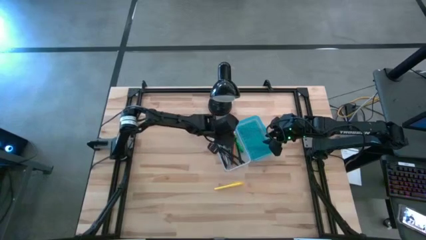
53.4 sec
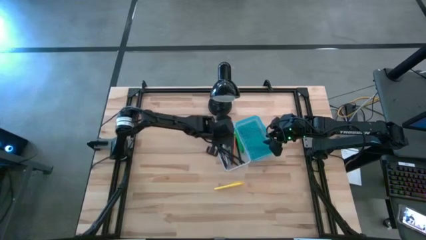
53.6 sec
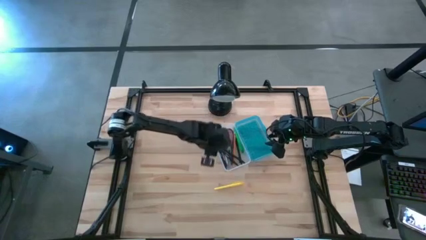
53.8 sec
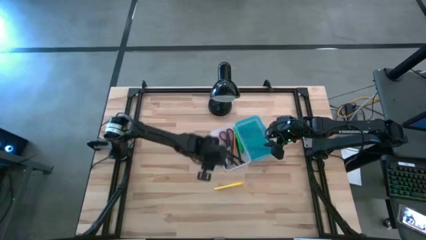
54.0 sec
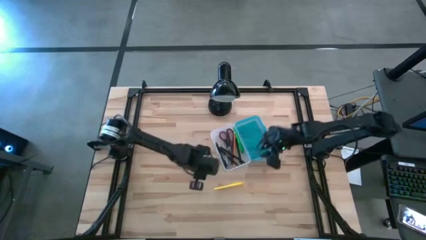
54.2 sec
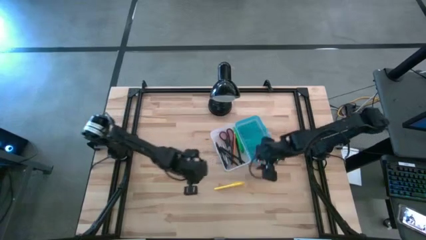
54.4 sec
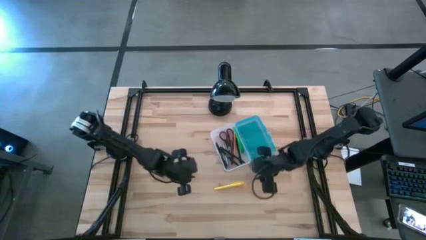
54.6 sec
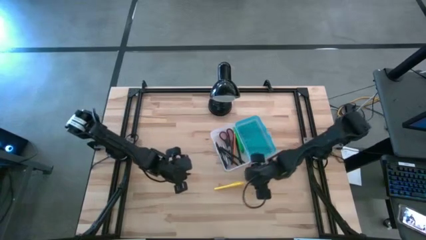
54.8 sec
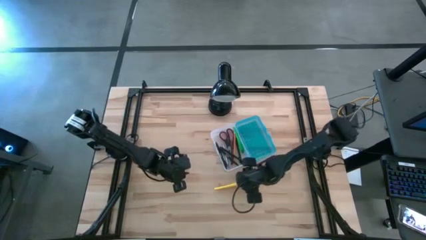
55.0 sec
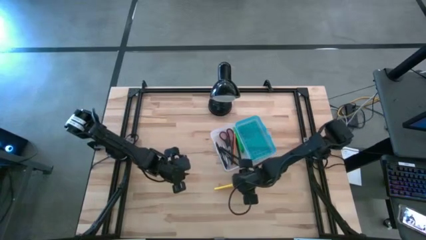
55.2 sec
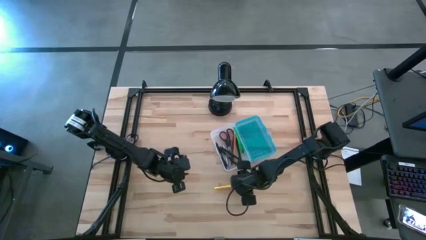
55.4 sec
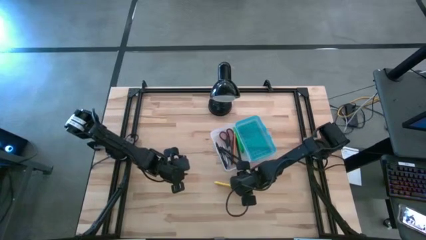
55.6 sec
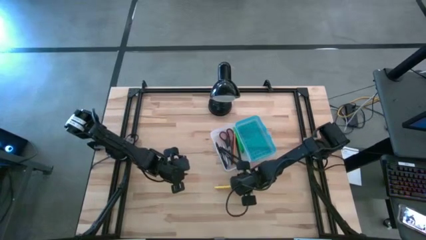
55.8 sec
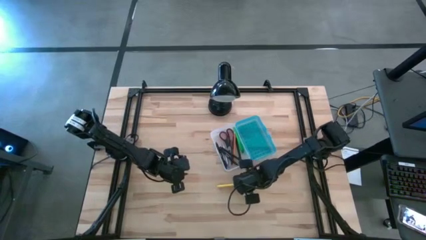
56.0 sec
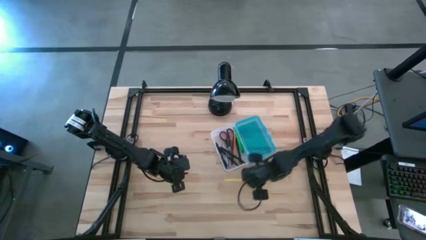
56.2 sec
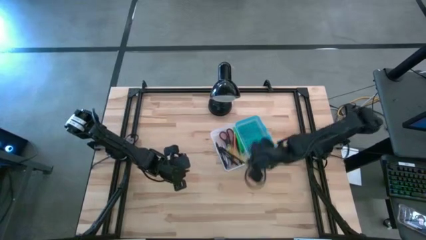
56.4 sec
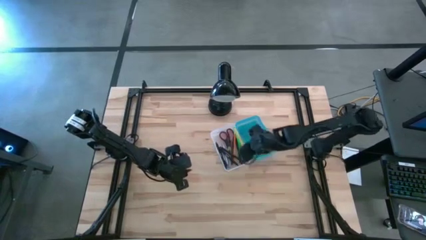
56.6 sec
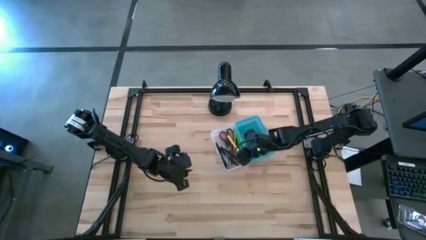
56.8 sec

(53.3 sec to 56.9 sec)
Task: Pick & place school supplies into a supply box
Put the yellow highlighter pen into the supply box

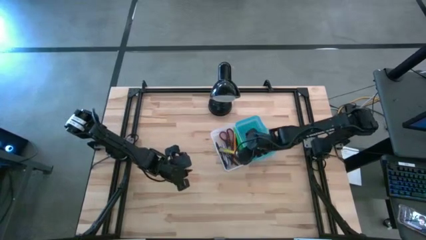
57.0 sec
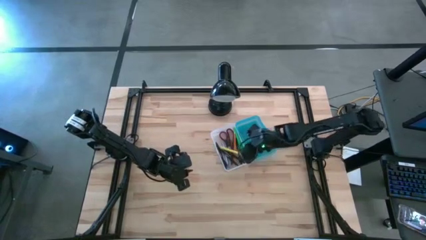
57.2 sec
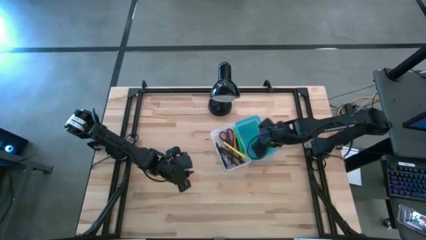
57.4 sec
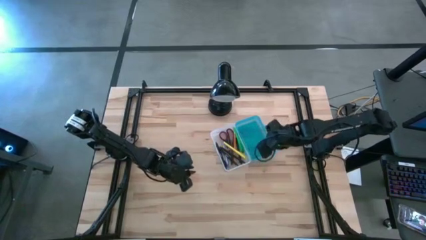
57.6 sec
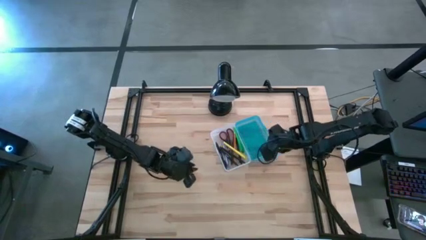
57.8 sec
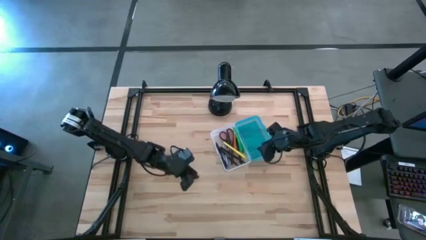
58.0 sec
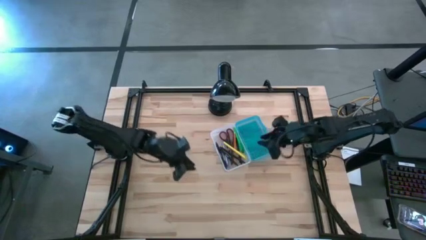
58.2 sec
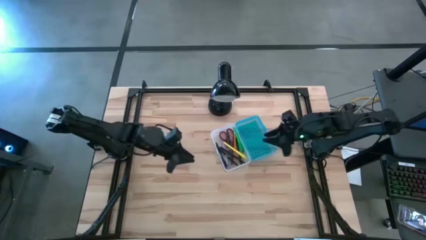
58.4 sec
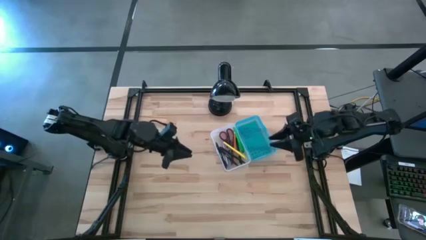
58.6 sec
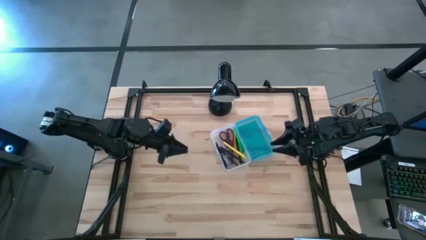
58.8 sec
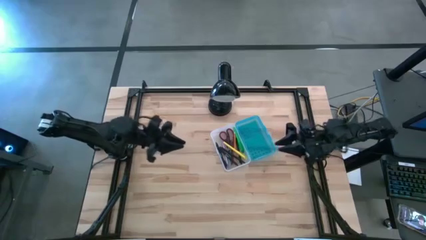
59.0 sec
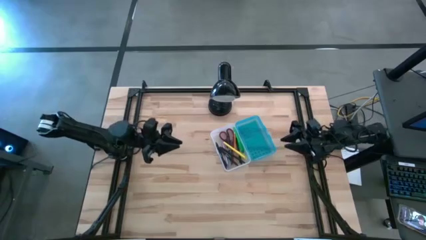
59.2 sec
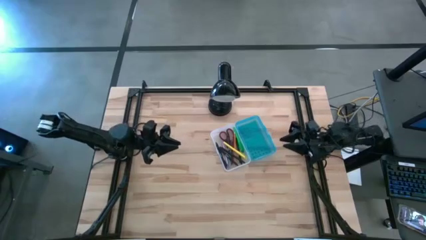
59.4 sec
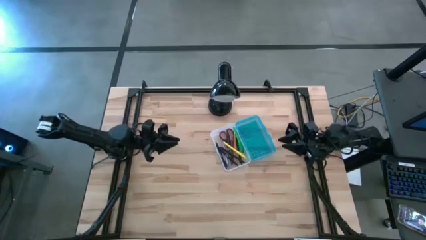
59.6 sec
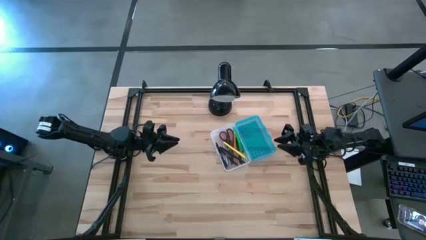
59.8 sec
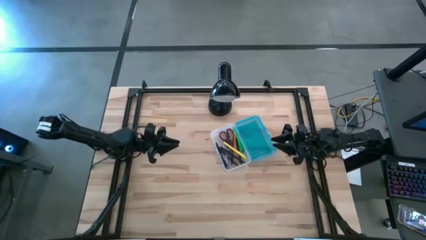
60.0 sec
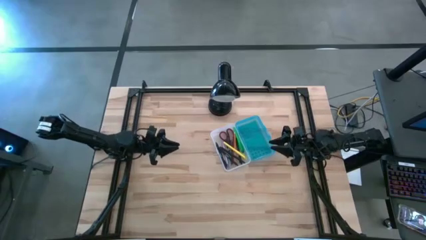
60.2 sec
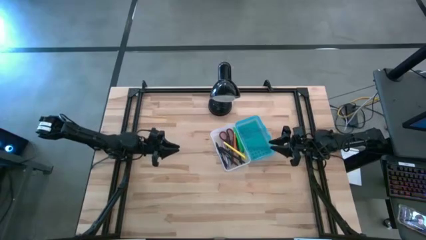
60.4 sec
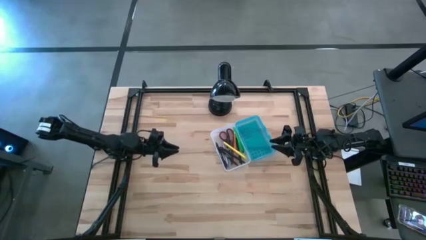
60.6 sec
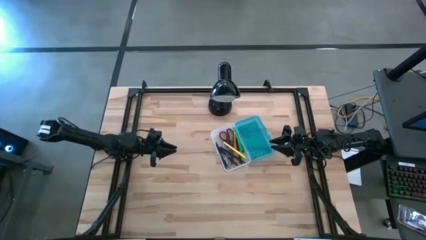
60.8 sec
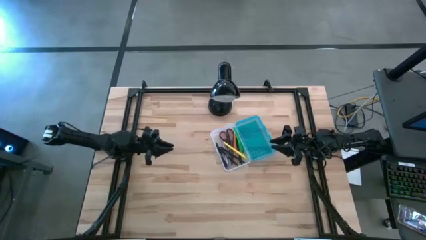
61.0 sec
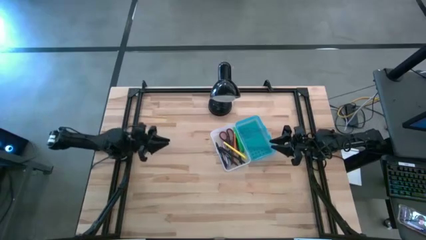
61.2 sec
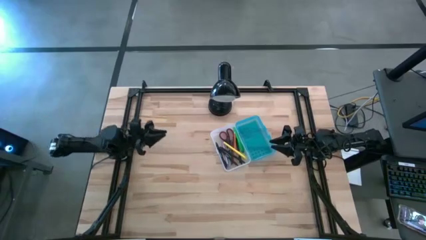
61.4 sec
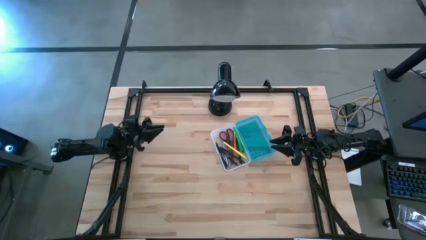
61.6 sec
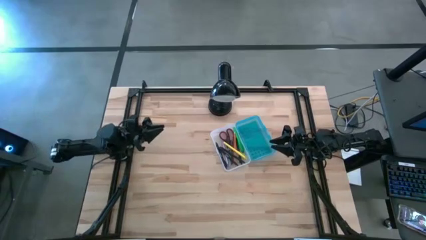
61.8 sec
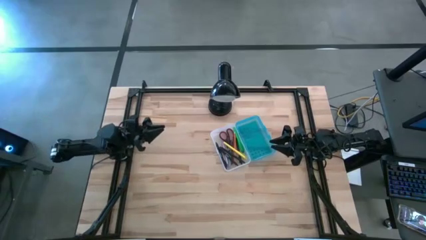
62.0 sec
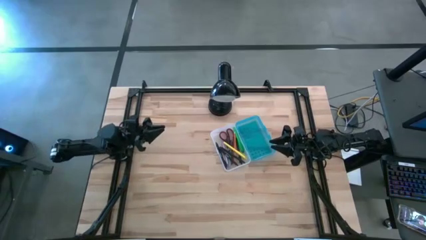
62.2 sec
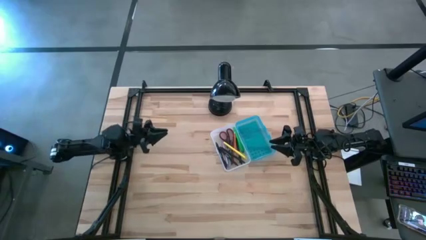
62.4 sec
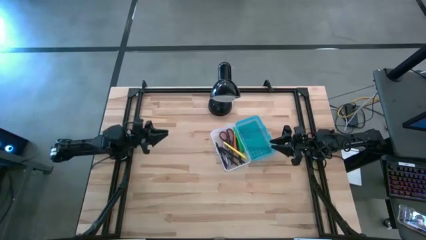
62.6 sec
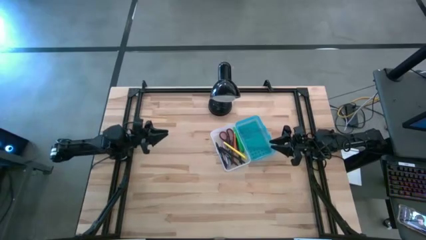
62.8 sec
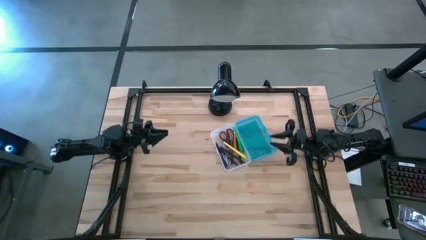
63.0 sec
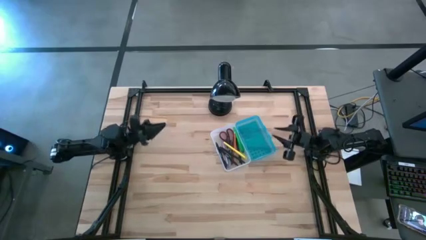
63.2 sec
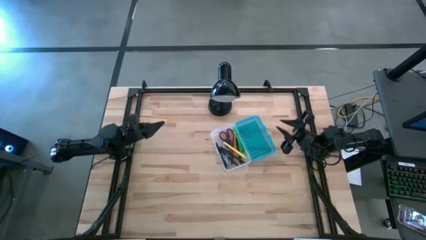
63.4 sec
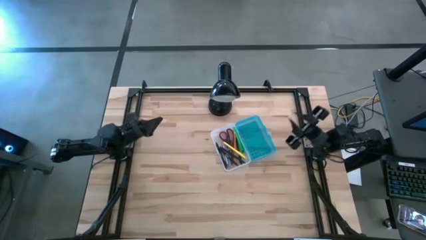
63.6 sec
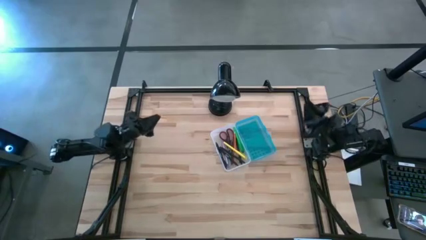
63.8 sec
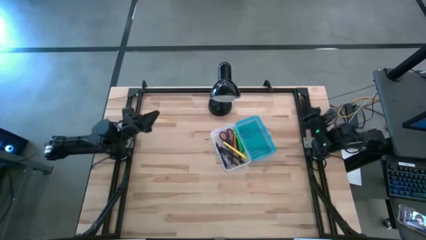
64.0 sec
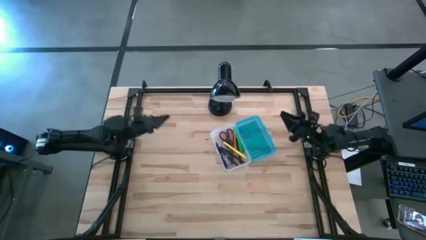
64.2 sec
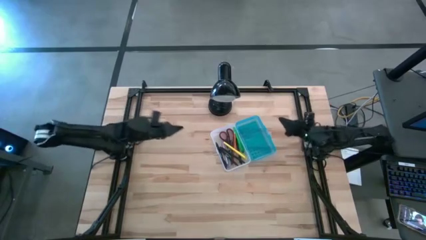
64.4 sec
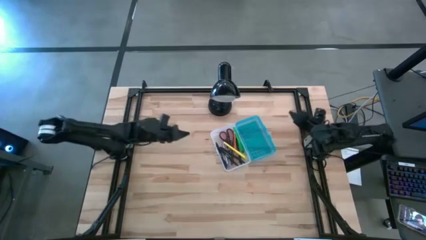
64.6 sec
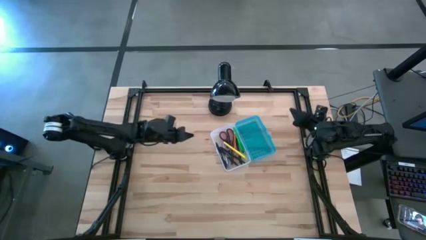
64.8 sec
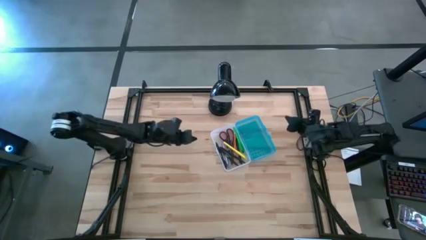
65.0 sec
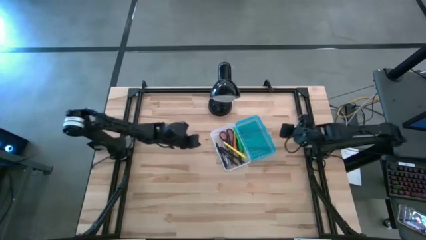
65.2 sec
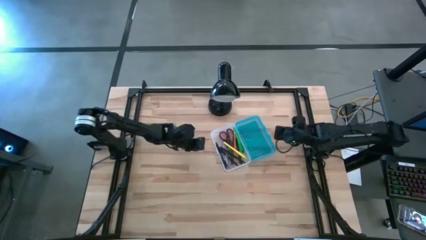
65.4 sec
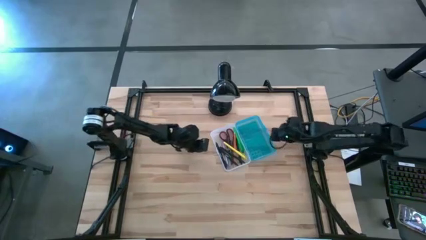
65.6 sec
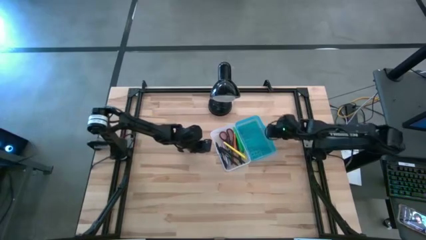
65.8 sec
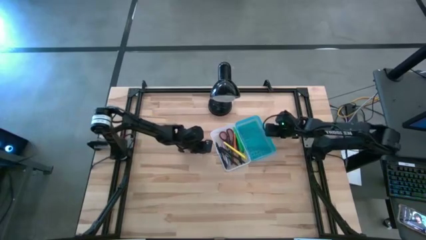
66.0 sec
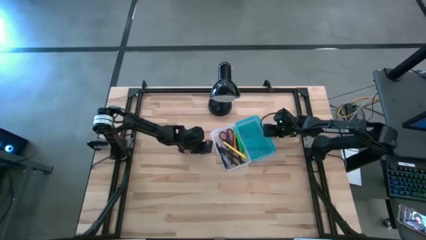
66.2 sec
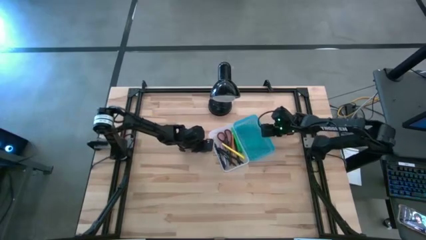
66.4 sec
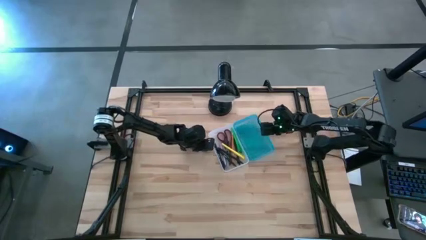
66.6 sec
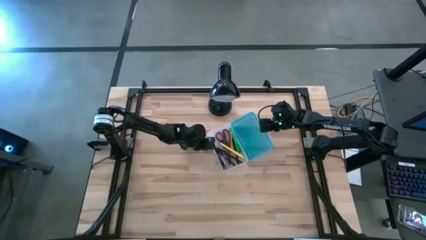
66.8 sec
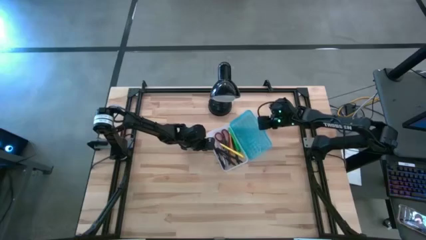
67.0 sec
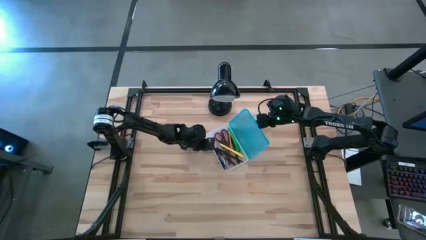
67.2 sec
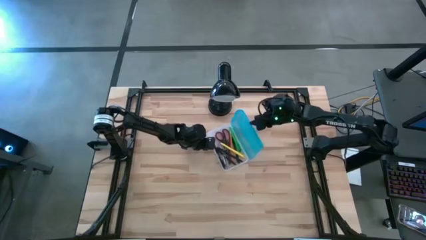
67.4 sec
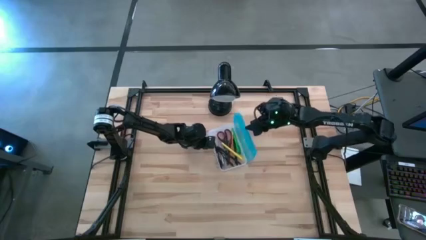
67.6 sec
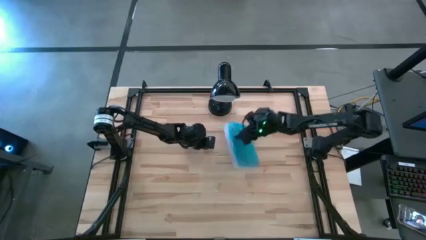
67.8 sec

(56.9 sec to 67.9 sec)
Close the supply box

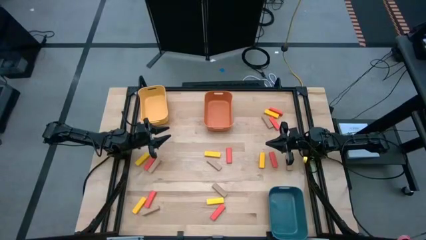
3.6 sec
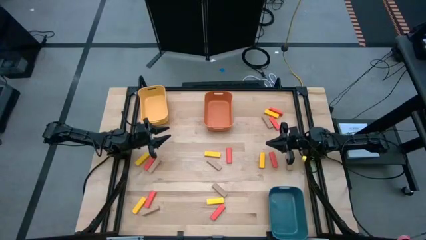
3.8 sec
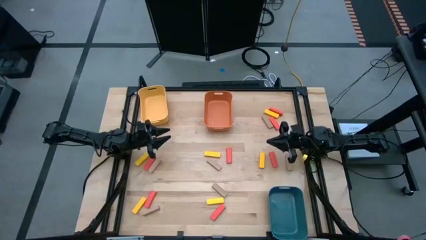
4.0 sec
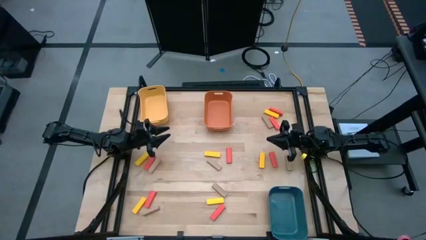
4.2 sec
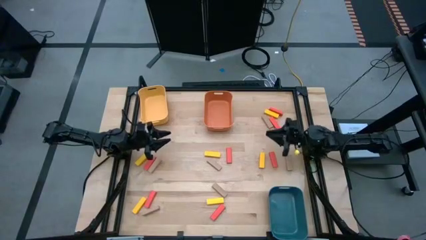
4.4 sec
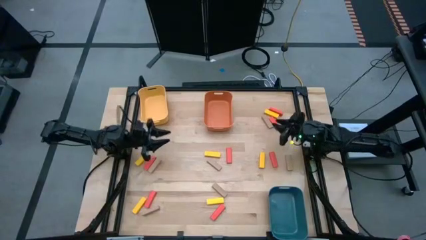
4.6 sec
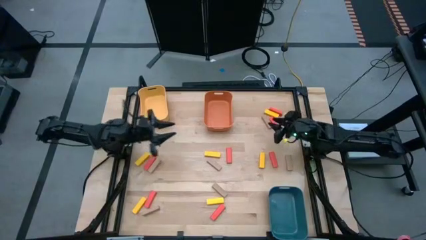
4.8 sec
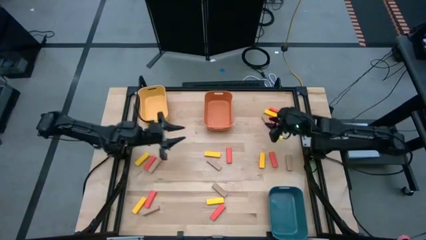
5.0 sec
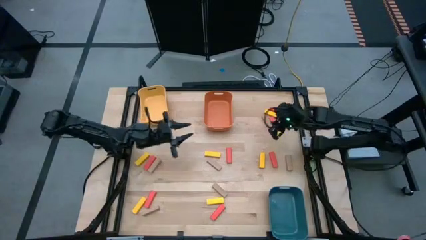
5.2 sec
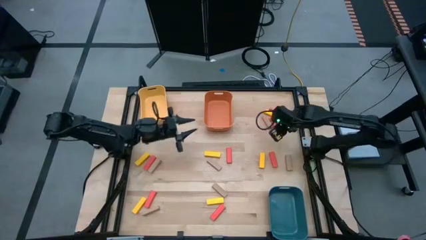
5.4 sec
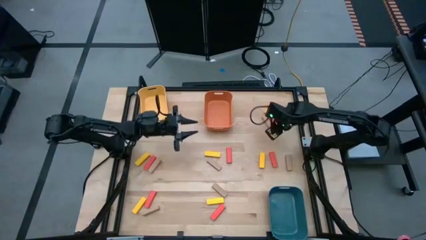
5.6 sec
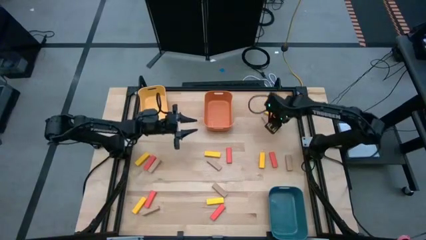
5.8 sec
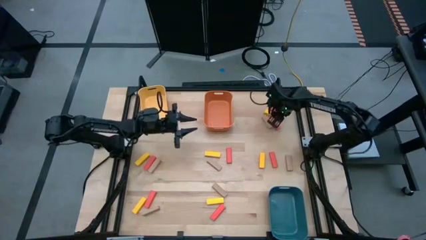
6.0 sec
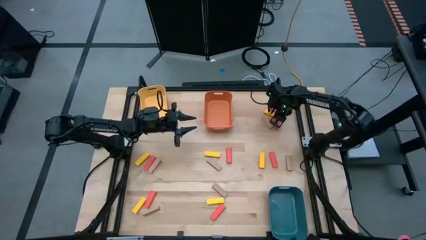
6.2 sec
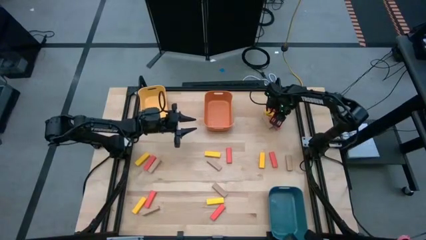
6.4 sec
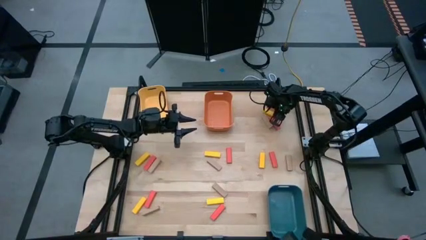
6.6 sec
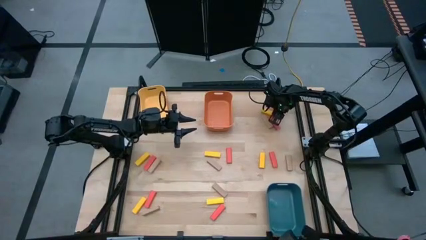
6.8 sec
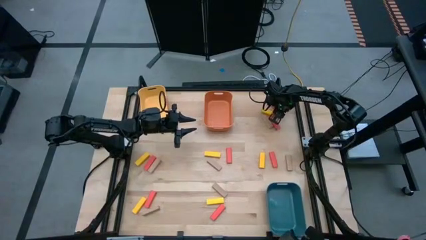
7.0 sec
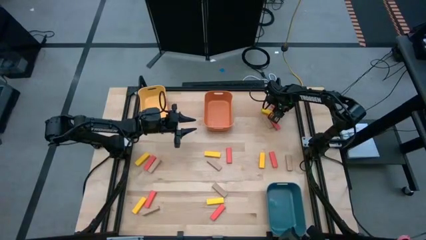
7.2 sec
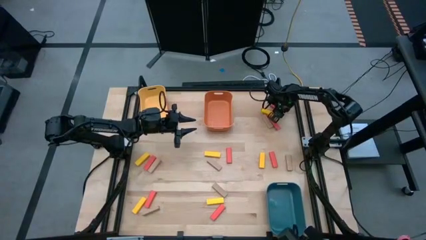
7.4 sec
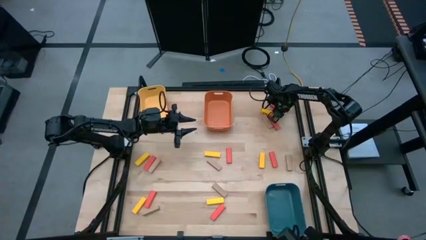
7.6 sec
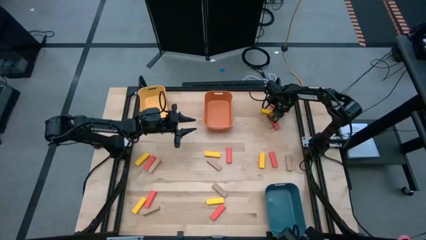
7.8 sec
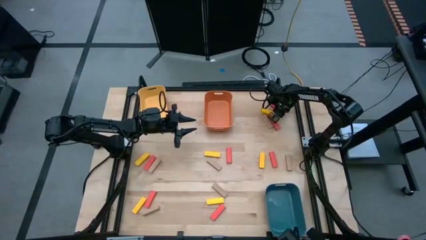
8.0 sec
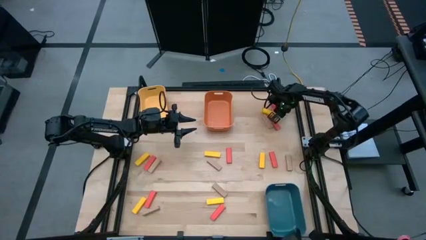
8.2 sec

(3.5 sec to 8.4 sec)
Task: Sort blocks
Put the orange block into the orange bin
